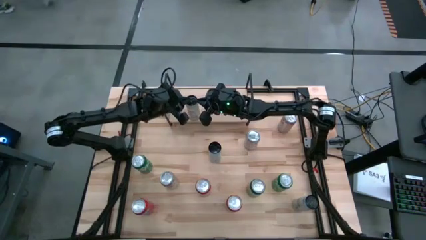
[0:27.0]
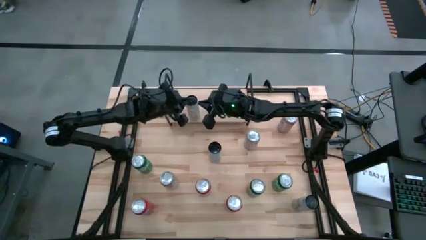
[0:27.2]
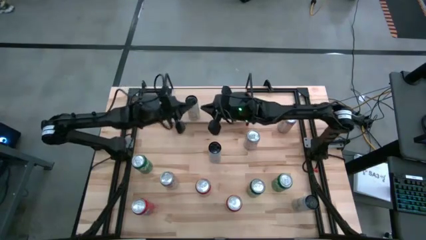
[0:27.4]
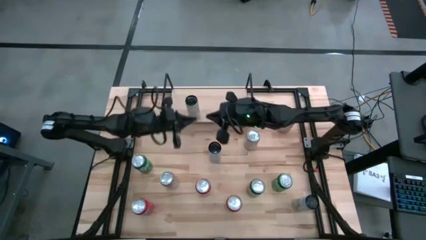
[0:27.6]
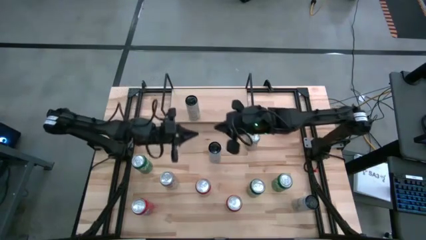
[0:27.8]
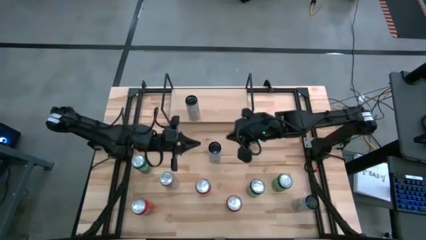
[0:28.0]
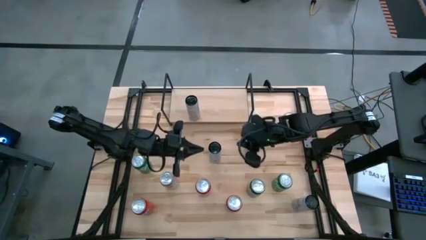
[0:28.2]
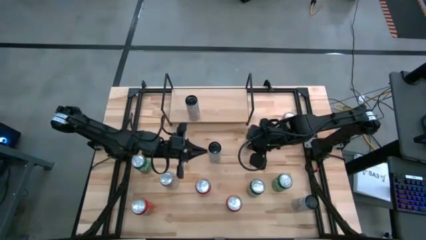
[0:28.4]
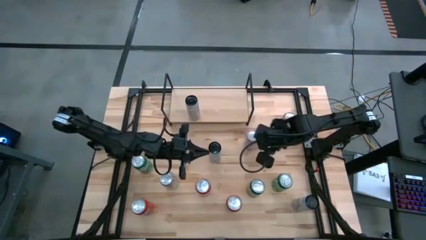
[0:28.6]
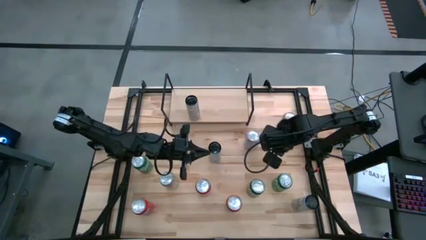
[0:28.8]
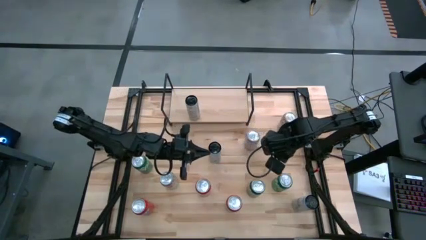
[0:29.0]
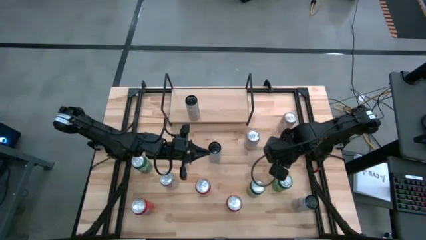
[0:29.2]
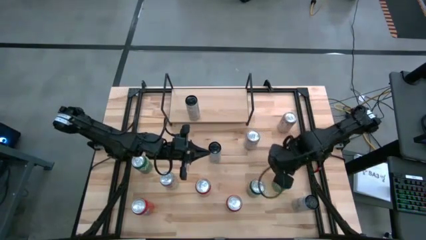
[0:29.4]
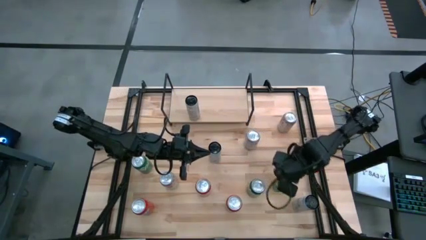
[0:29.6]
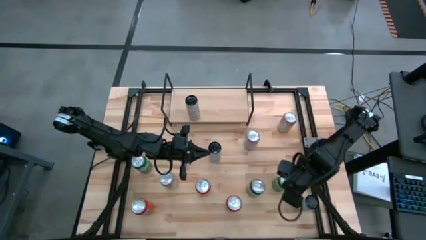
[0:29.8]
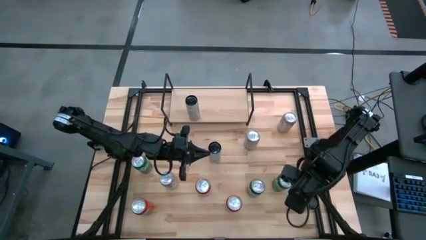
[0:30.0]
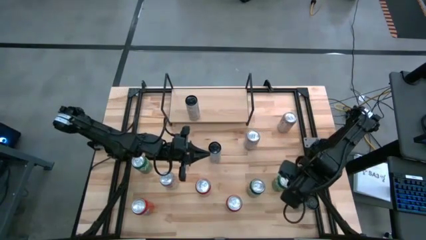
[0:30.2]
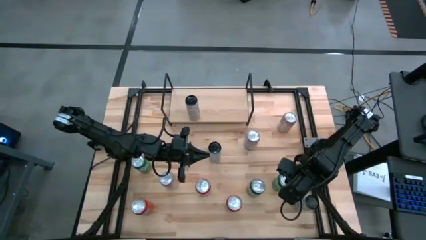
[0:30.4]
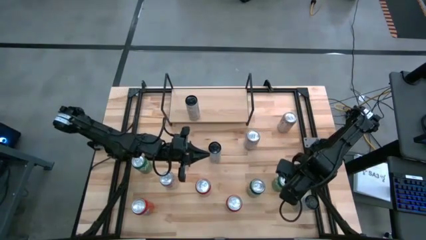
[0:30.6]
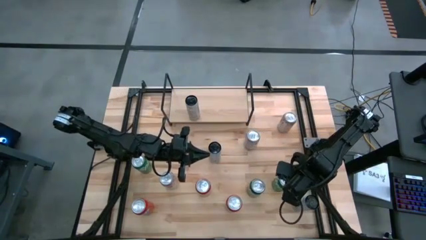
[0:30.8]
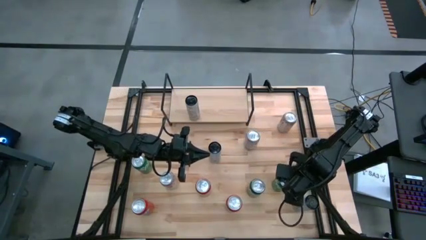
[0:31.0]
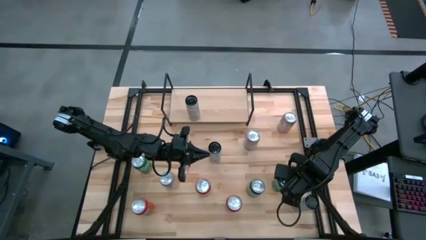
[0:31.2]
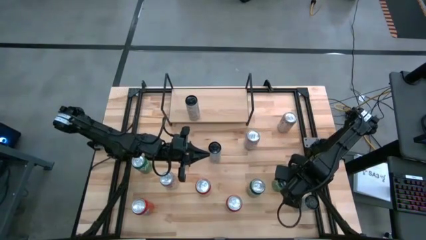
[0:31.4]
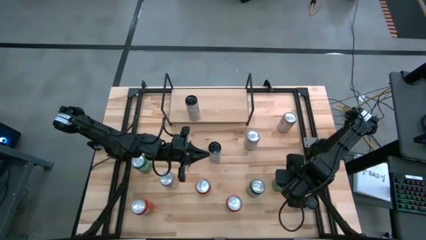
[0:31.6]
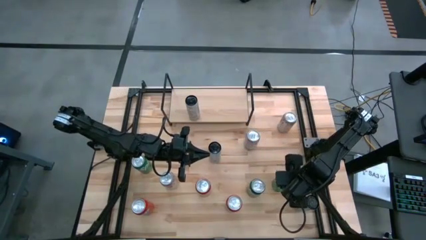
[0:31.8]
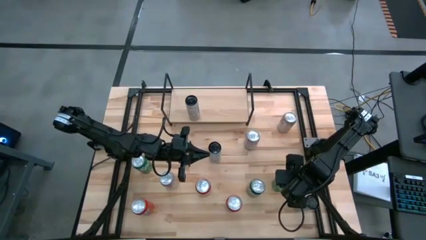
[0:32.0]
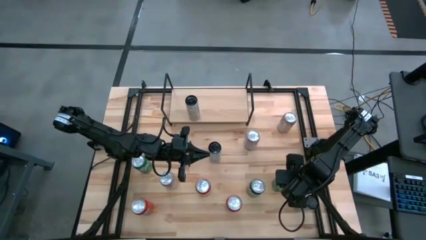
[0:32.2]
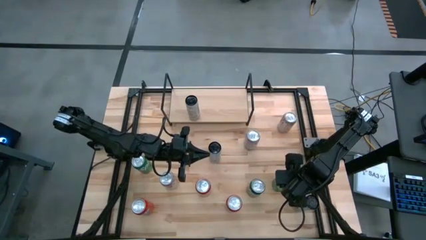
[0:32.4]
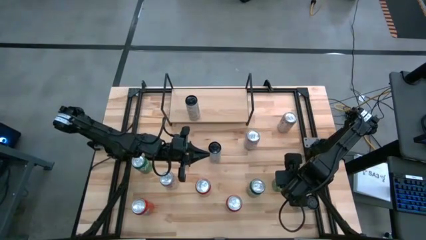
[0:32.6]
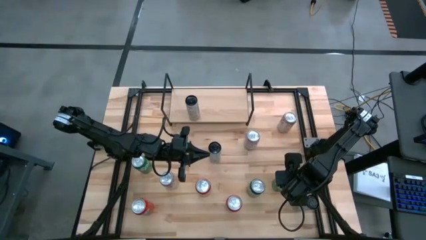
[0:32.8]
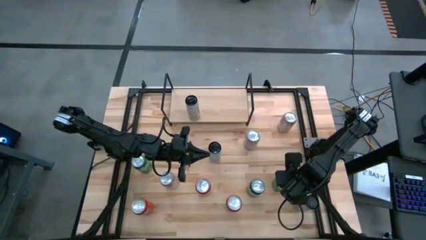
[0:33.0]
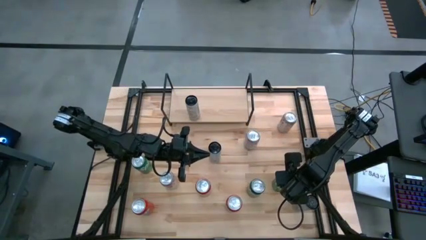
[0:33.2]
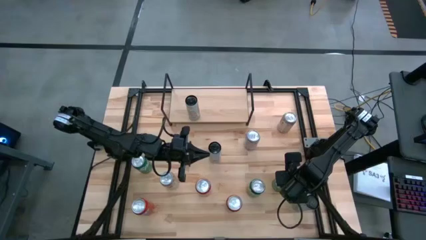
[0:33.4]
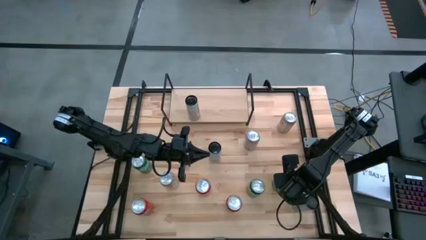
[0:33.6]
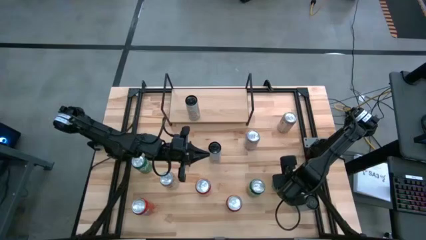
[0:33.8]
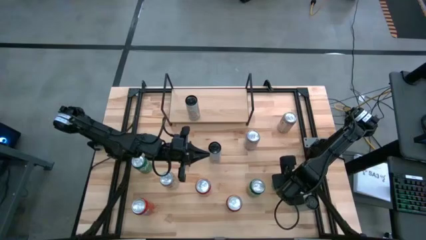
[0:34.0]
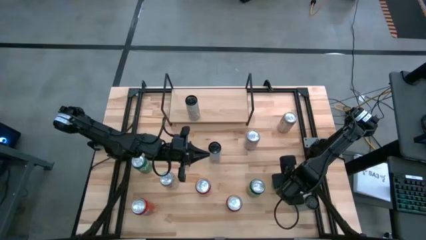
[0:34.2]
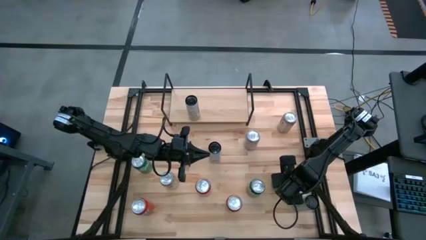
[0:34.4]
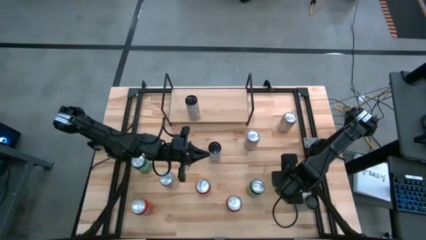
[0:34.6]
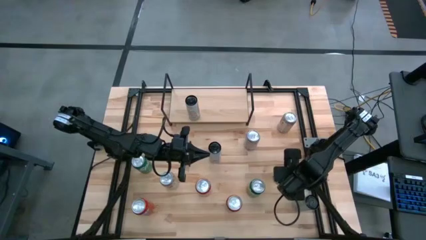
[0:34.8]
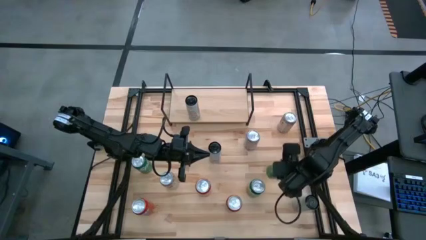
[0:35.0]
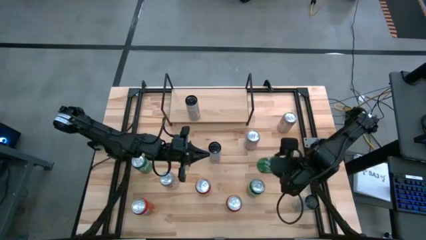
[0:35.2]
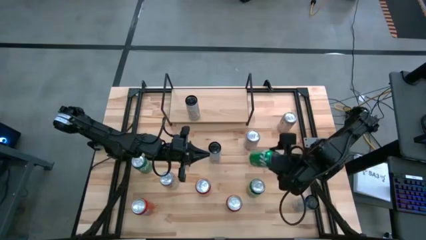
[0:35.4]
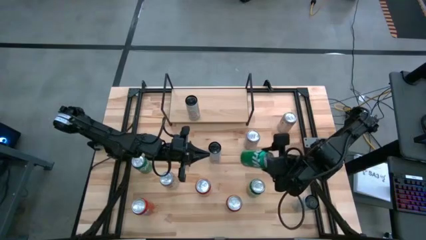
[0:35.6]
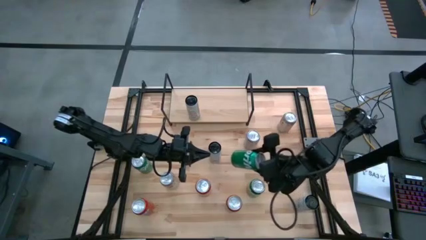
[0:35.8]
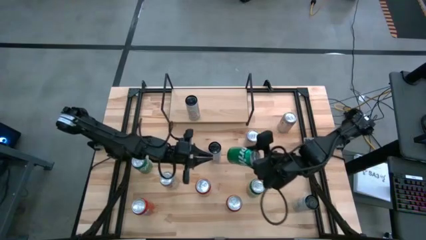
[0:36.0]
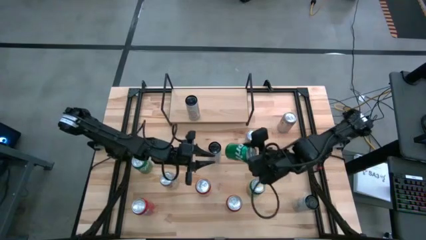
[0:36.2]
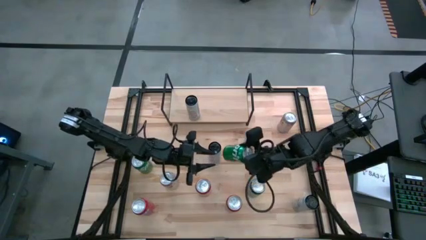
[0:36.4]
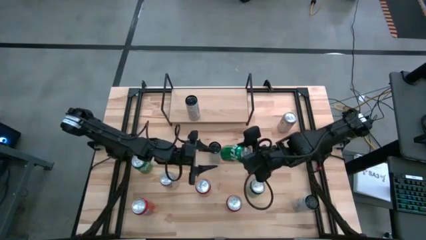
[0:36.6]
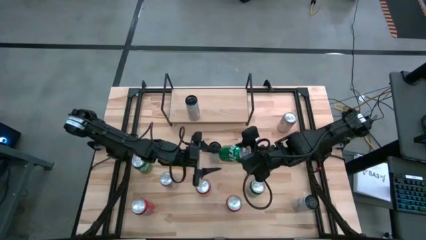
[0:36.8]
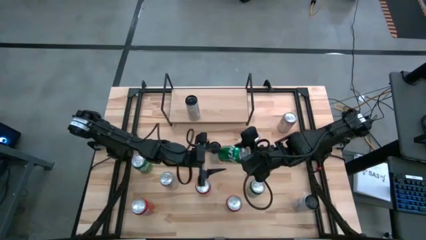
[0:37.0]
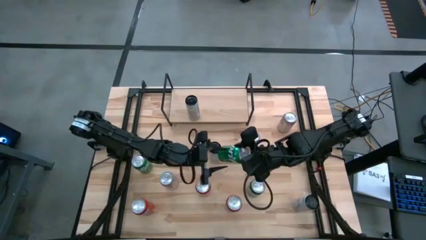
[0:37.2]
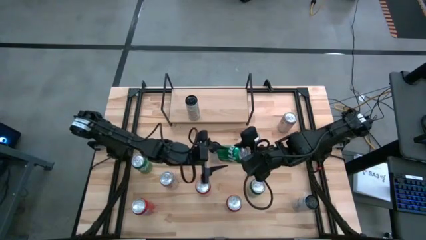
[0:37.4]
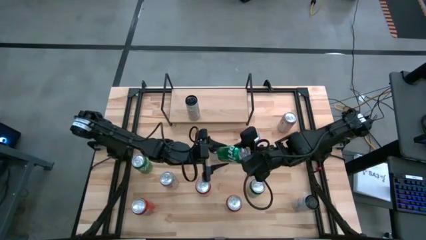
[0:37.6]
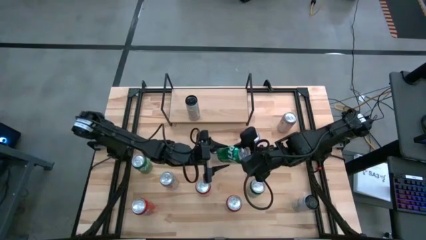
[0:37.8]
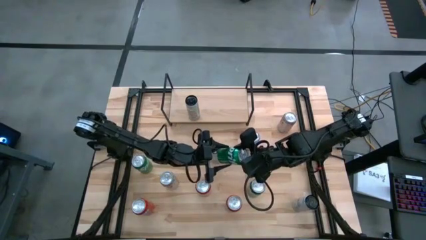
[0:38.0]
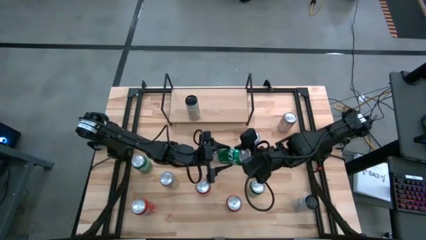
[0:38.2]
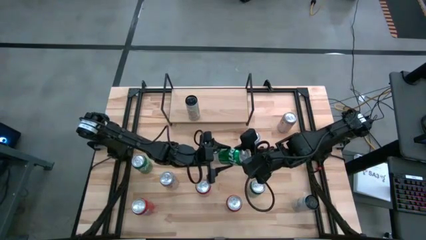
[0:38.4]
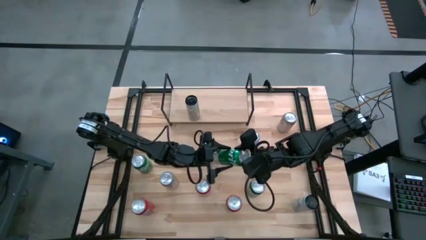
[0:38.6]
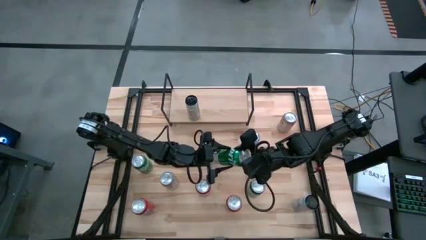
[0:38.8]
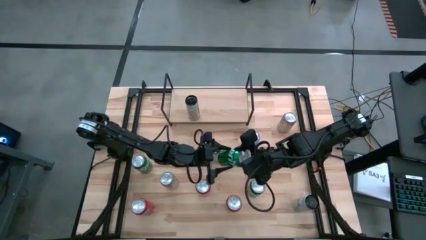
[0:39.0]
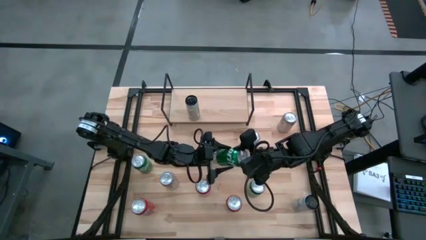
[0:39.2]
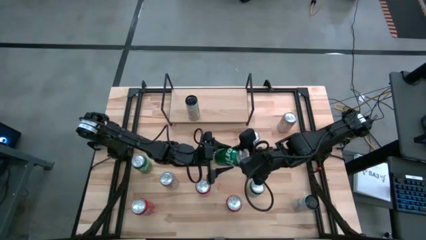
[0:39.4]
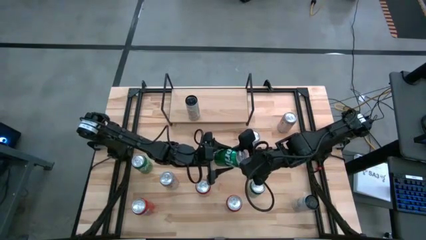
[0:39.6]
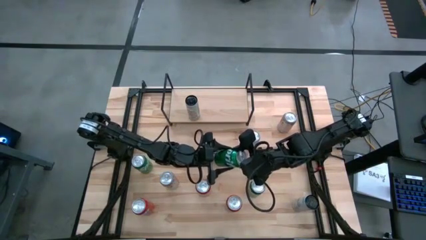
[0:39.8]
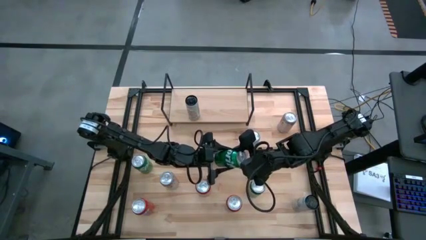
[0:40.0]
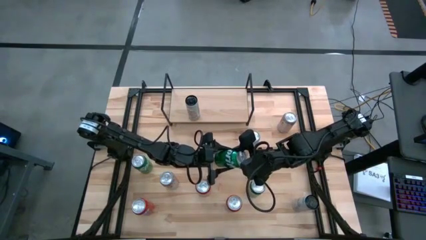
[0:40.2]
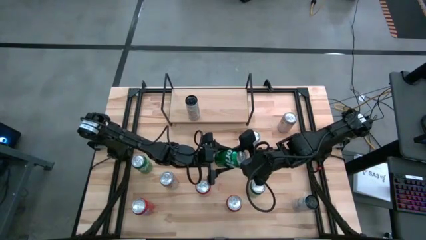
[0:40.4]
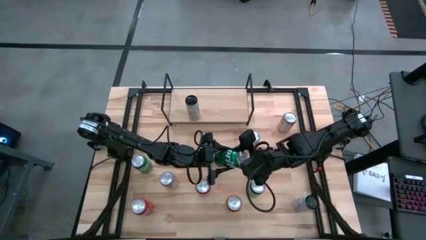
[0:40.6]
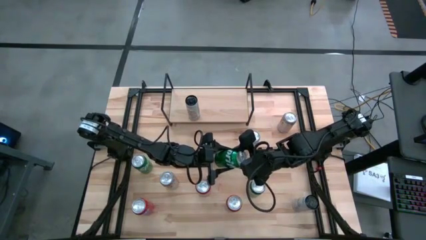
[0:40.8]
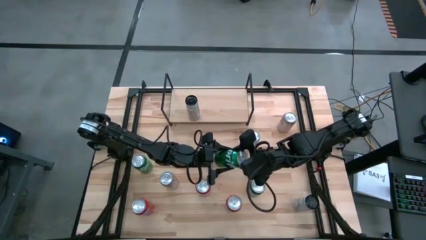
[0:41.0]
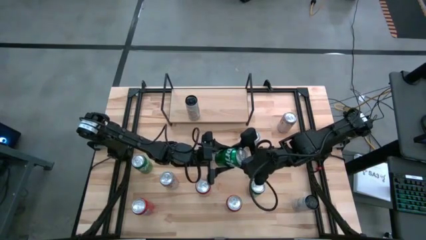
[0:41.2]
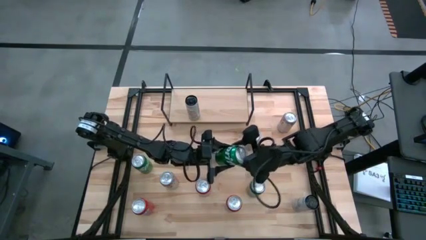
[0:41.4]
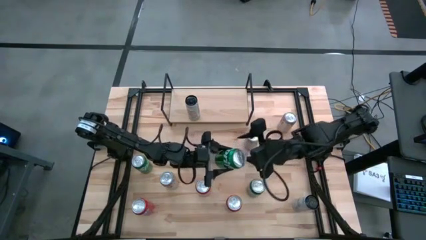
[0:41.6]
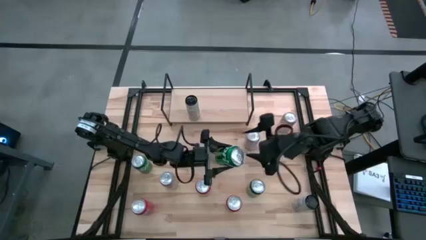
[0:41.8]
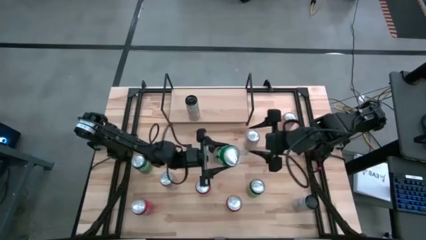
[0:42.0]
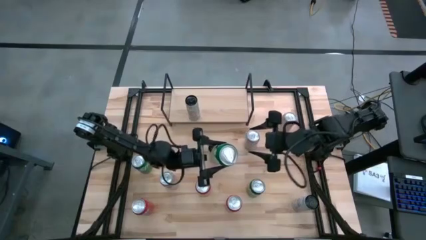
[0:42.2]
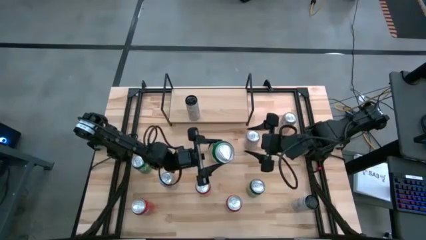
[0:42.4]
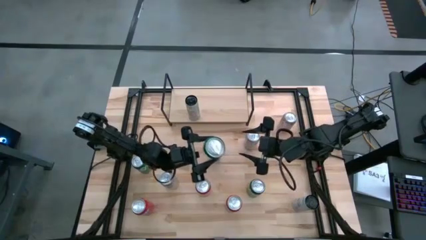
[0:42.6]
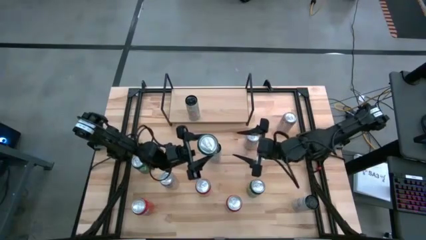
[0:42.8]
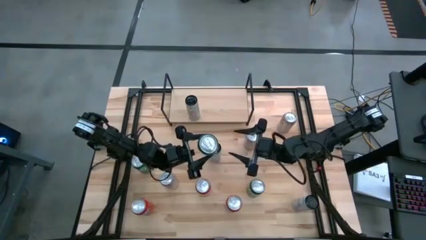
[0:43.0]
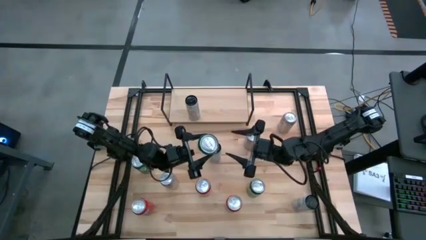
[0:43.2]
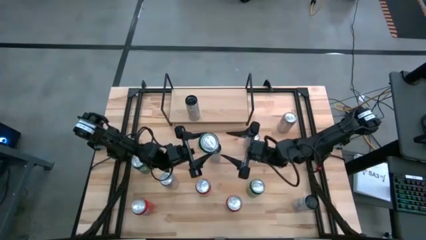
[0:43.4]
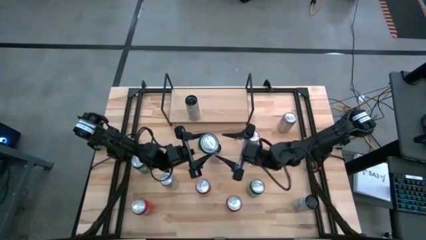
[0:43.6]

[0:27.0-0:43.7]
Task: Sort soda cans
Put the right green soda can on the shelf
